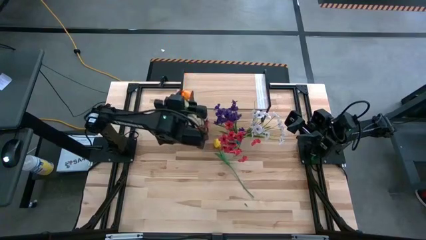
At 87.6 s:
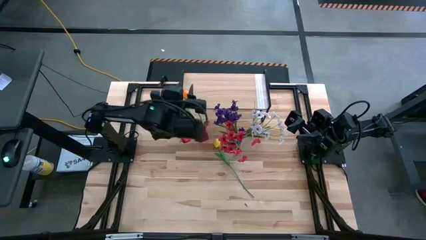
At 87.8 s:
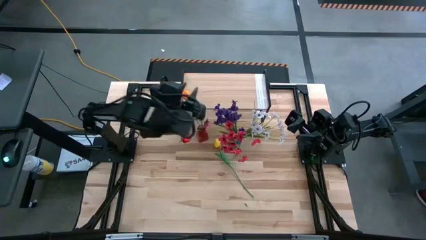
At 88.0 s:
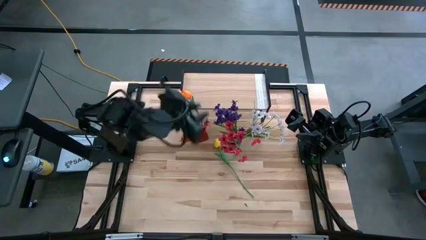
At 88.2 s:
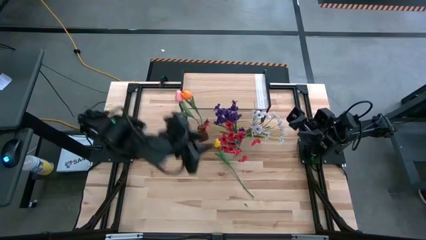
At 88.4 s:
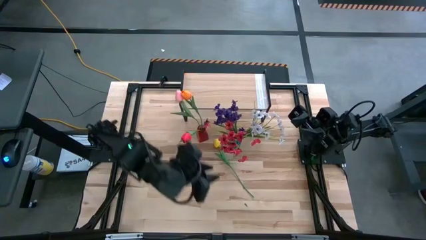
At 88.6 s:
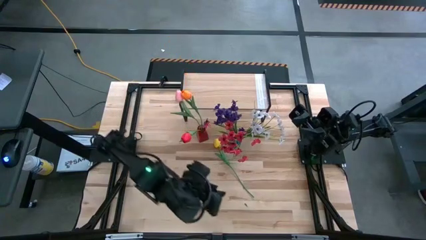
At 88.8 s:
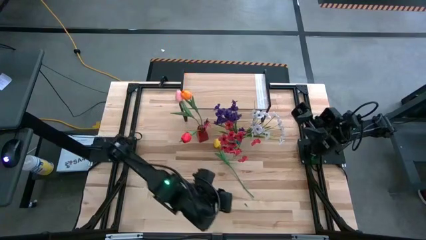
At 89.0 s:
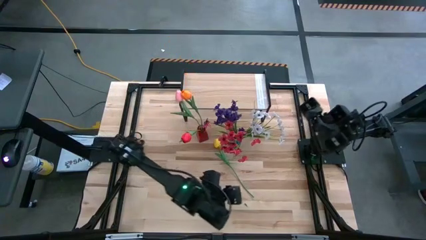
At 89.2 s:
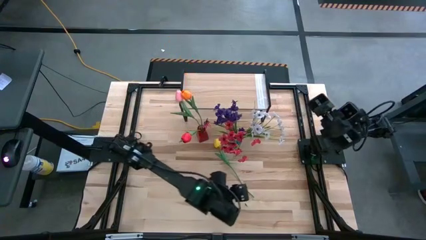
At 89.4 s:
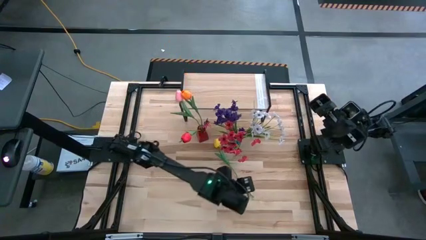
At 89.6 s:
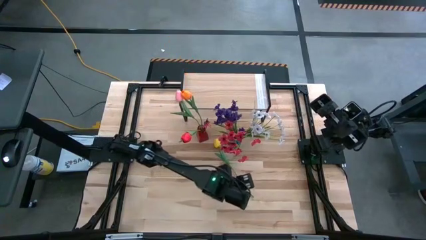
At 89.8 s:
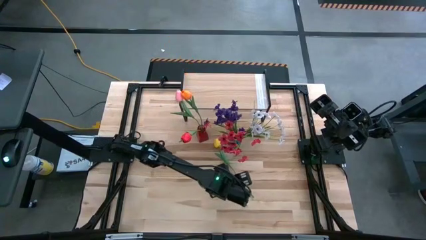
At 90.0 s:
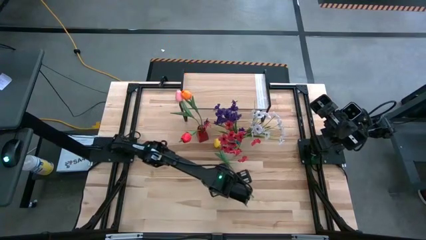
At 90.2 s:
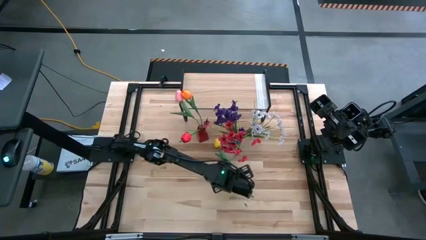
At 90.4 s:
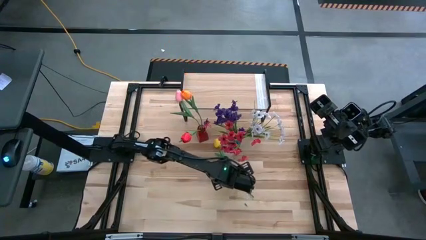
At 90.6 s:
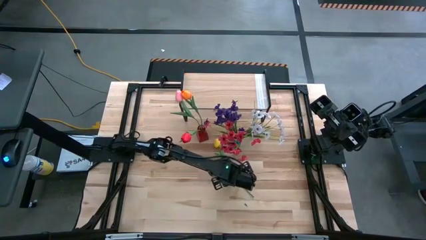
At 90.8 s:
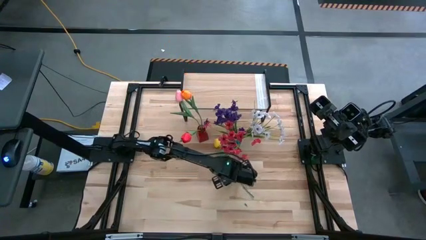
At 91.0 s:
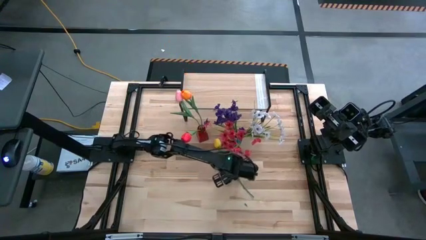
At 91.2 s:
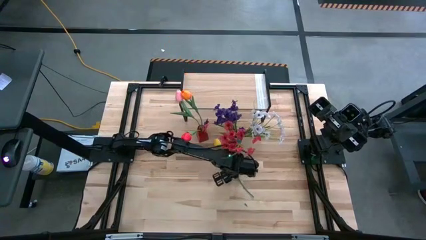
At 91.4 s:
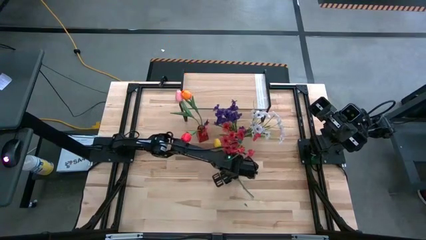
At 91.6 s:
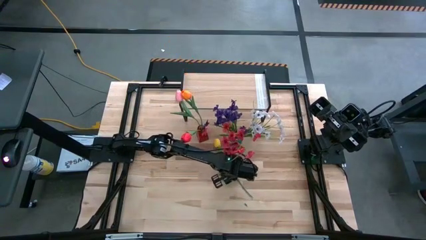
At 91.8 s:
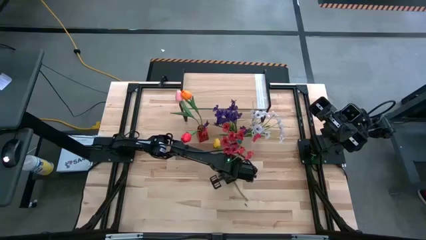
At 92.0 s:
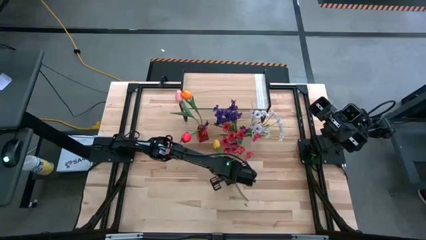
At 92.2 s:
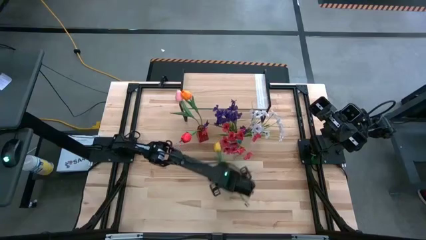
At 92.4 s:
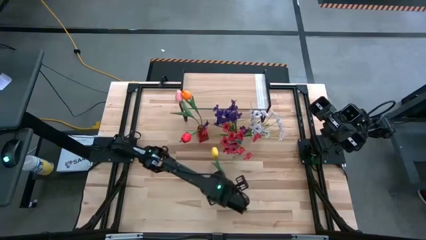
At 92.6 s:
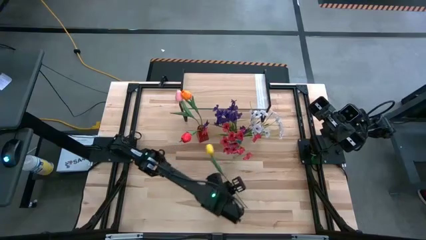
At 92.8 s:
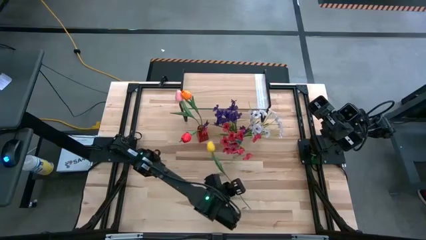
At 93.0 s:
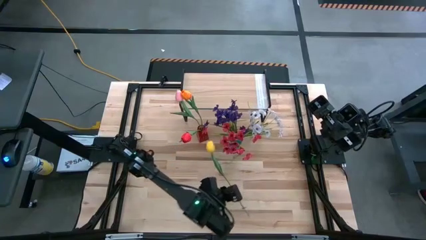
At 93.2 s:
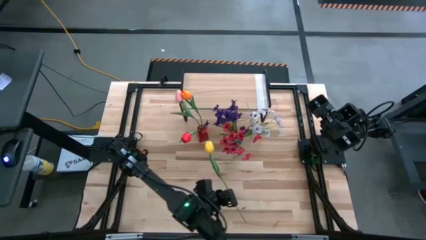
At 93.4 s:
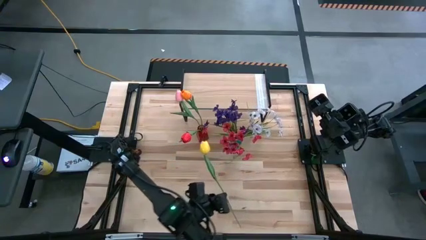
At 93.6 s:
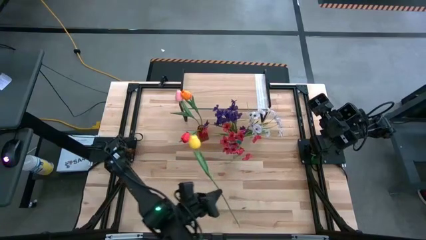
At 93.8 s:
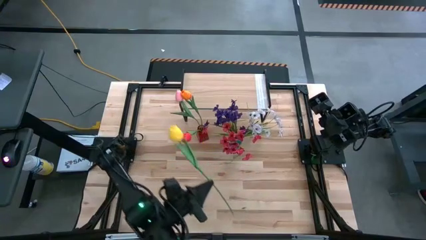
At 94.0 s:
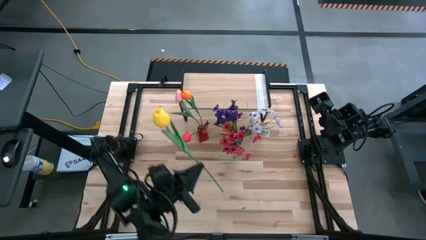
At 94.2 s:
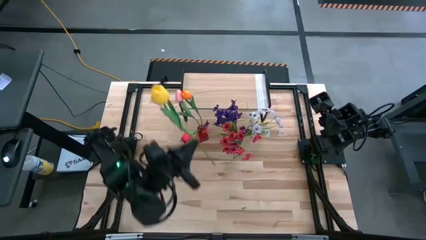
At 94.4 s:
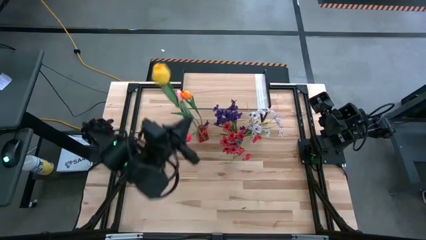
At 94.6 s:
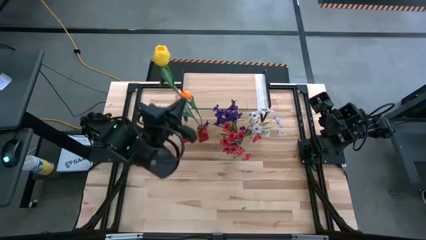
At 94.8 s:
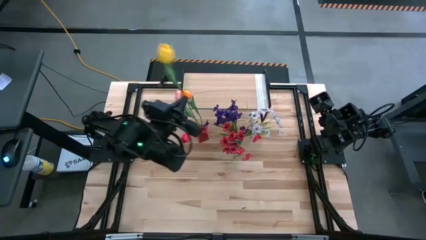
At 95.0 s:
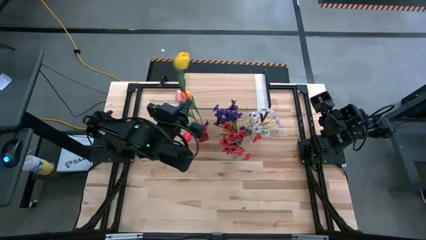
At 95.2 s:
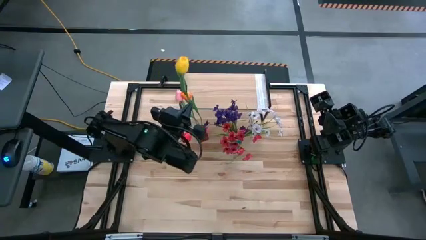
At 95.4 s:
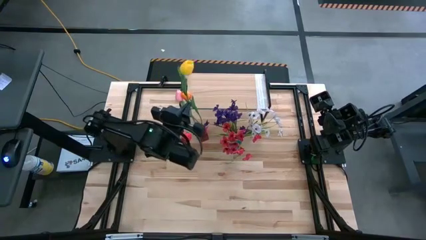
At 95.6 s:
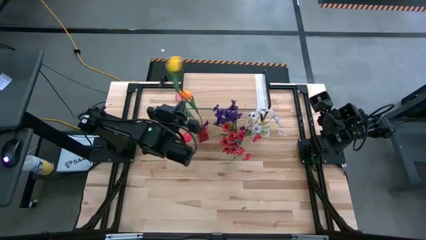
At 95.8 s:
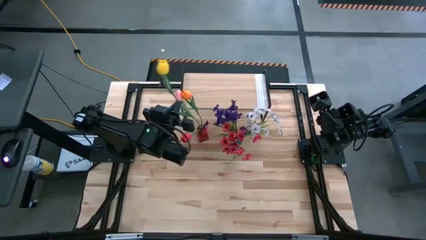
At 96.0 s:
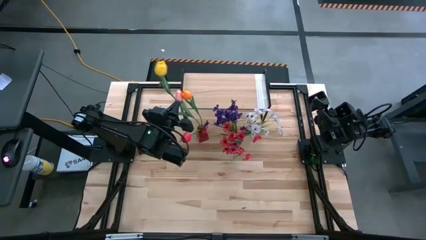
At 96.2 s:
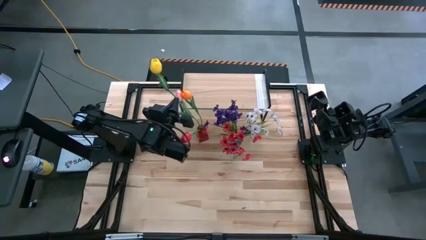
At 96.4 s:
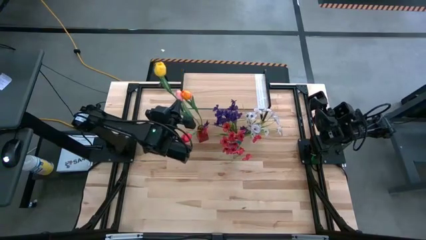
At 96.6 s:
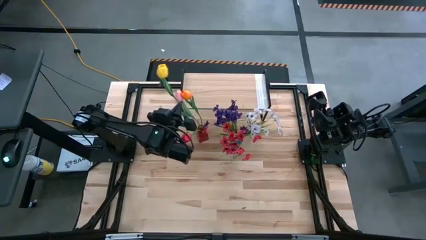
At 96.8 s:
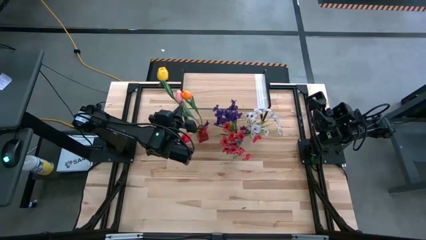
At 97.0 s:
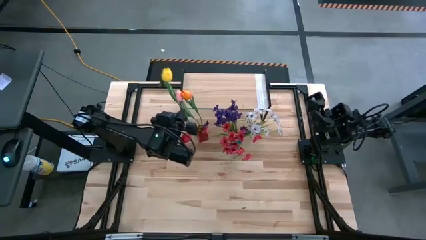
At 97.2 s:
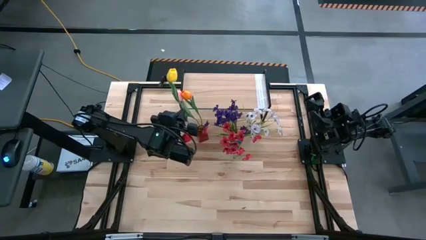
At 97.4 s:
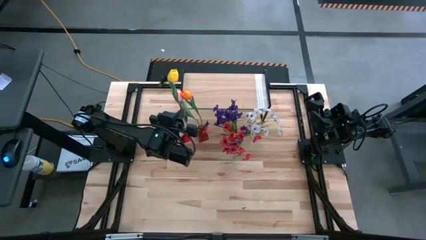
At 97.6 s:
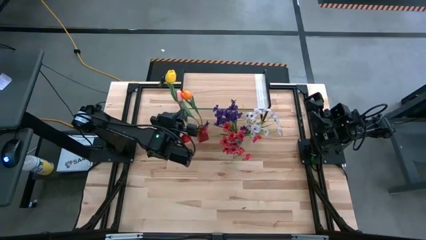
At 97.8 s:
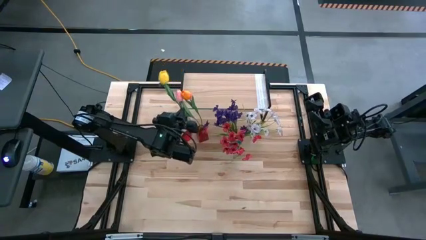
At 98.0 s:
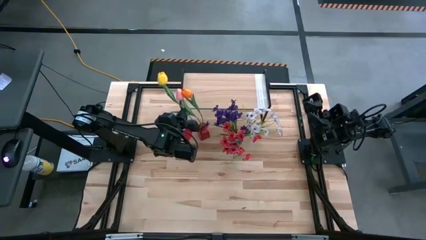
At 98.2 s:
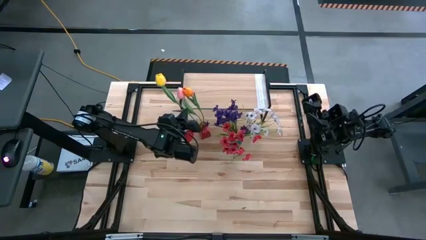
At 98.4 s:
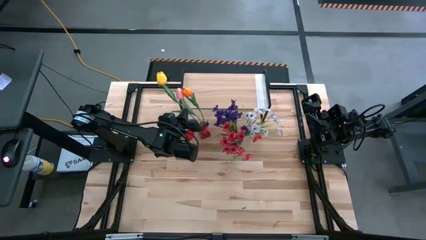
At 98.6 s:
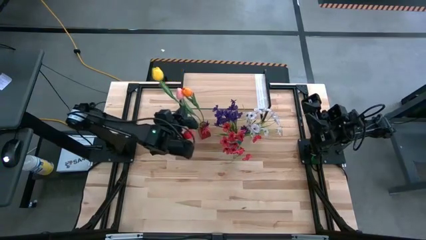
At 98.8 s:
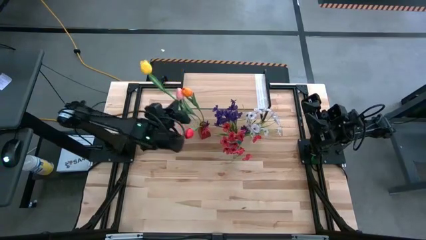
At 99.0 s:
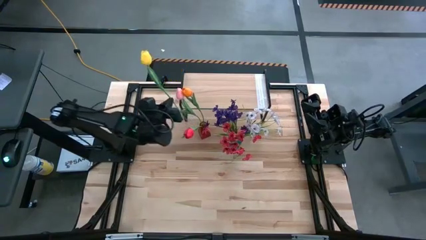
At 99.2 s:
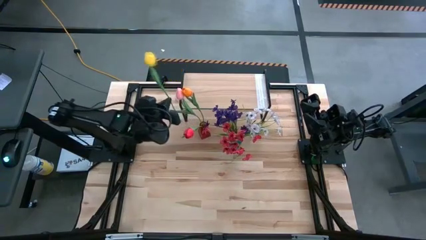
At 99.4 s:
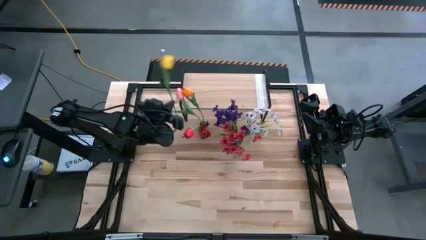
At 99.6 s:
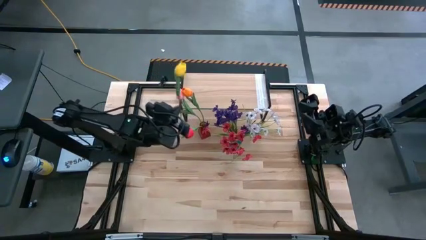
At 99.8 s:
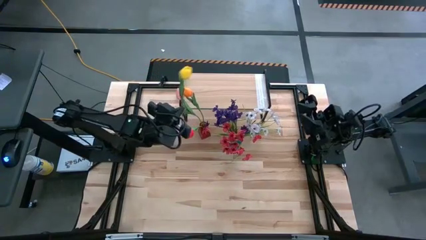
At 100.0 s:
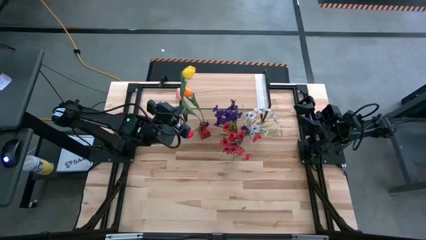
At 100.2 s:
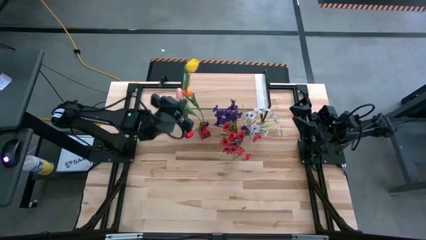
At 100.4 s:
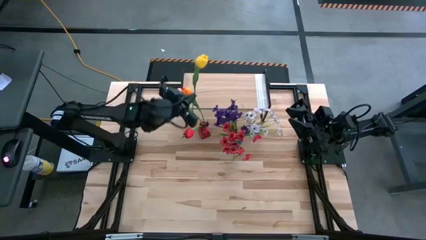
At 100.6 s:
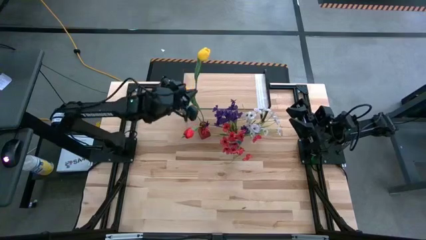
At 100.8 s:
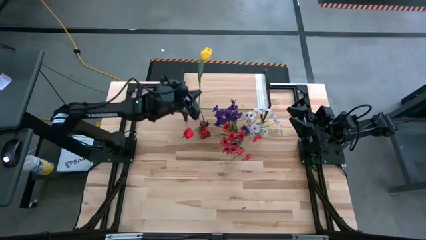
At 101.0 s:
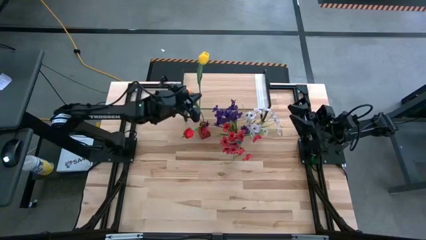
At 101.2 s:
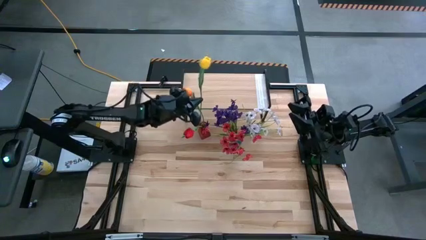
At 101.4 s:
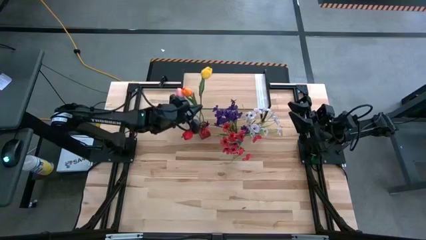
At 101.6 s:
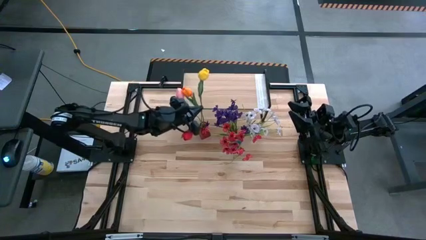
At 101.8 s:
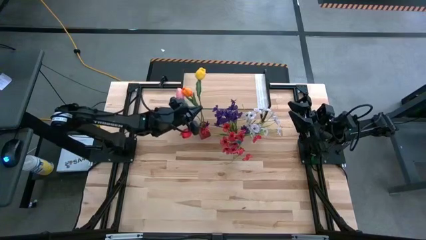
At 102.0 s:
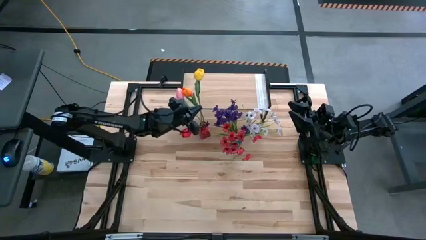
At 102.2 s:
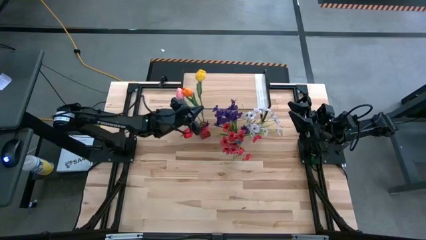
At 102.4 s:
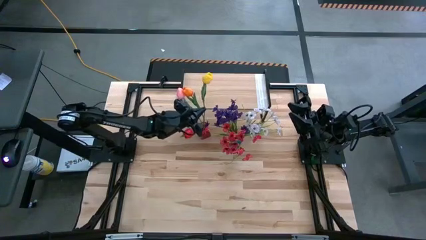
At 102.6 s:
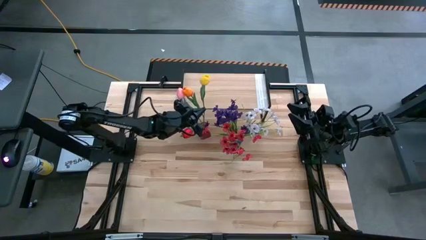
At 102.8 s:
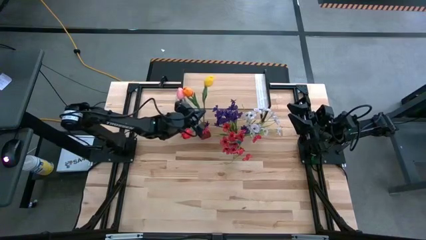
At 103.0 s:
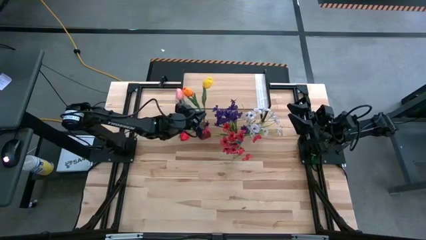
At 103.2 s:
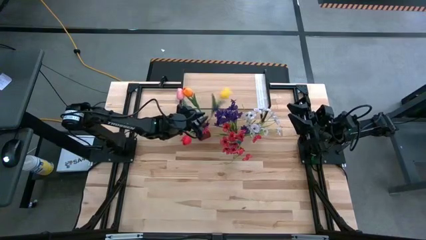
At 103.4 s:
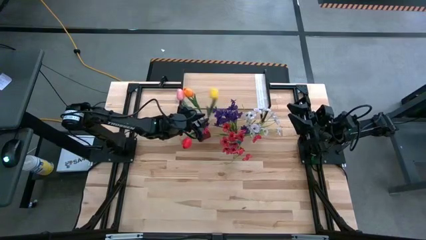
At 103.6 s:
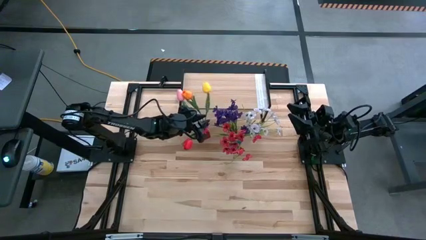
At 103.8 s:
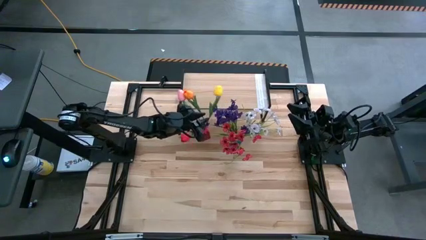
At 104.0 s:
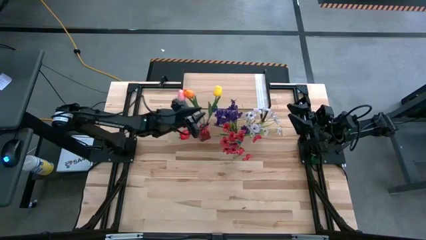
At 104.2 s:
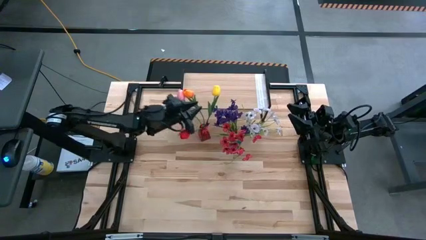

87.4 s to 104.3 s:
Task: Pick and place flowers into a vace then onto a shelf
Put the yellow flower into the red vase
